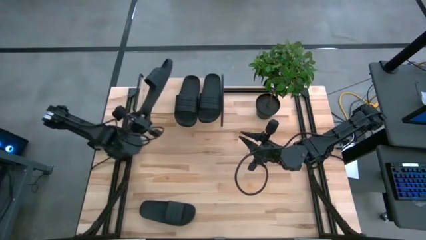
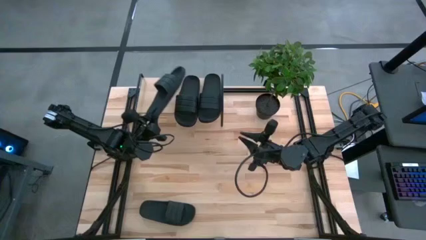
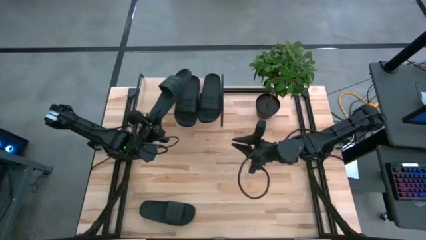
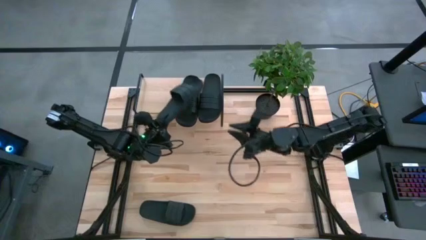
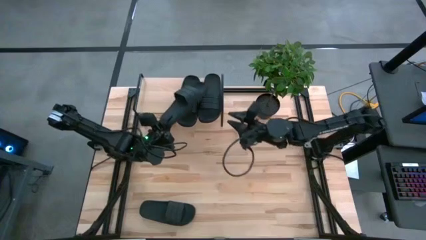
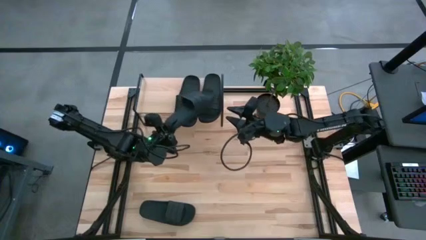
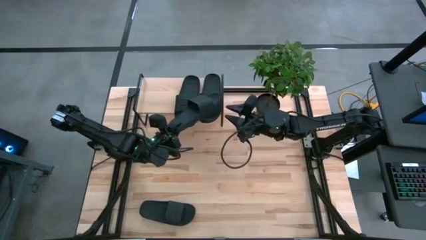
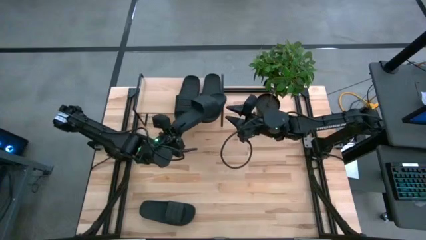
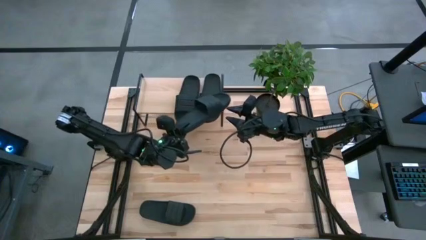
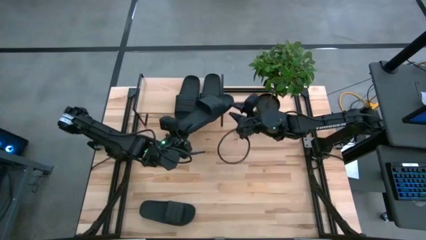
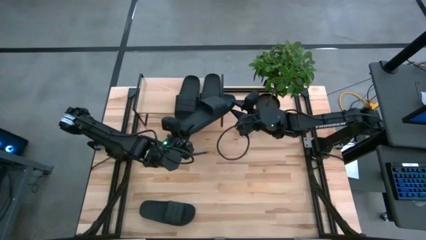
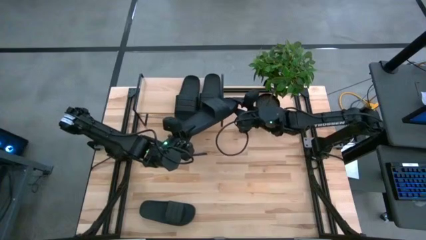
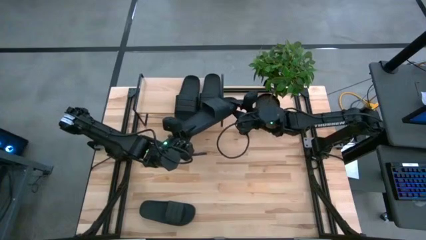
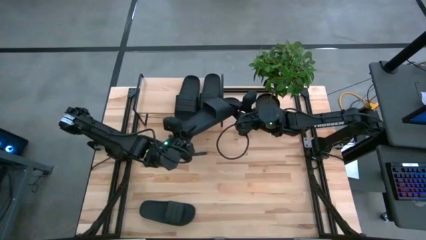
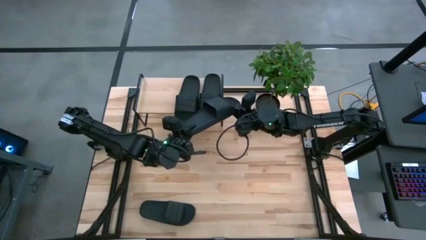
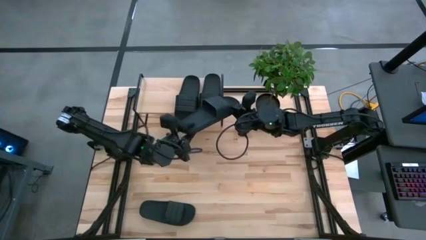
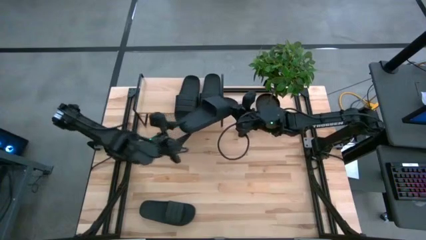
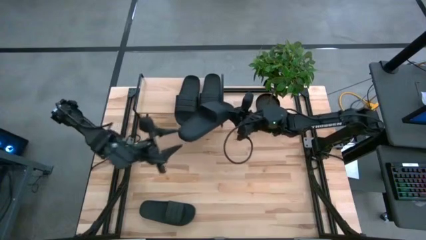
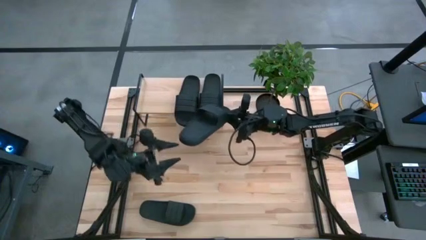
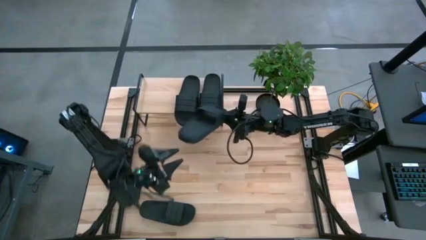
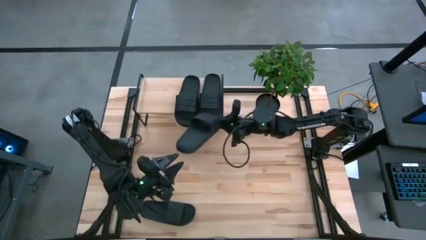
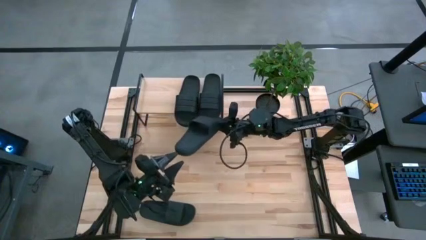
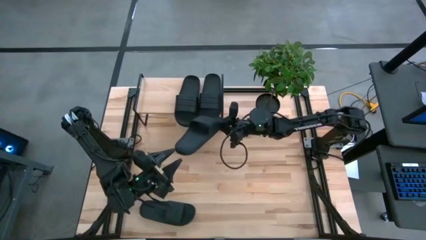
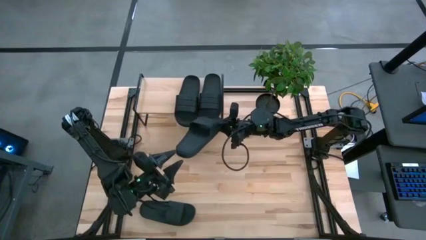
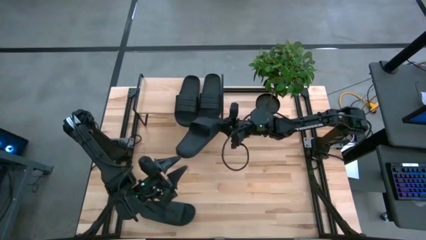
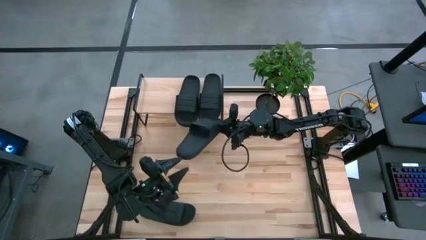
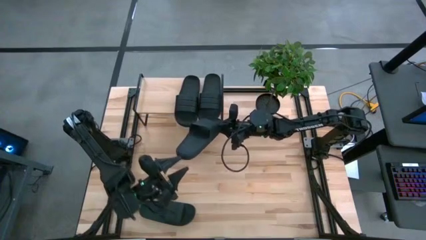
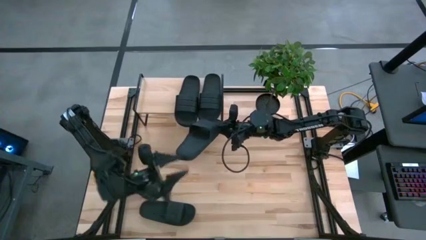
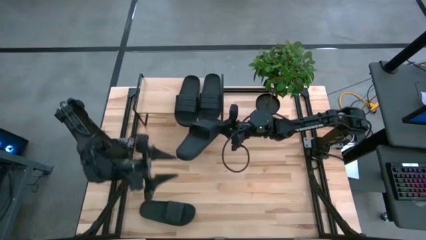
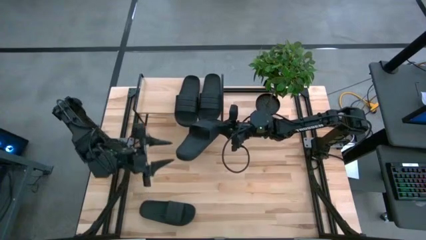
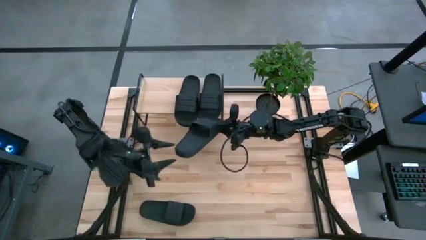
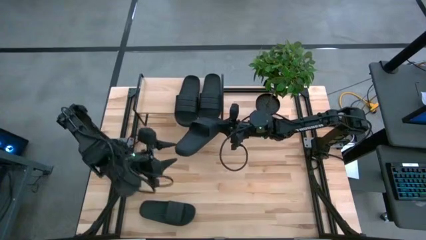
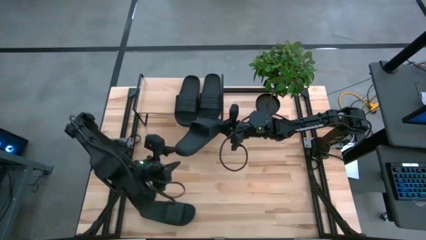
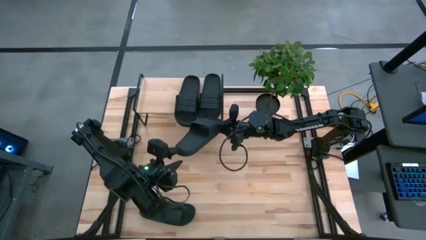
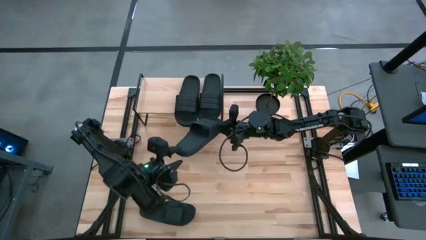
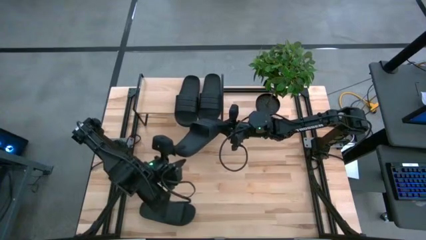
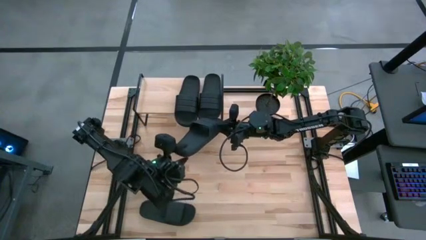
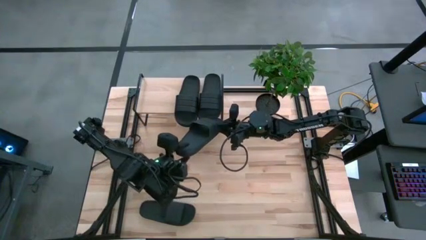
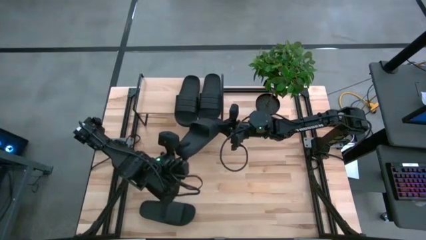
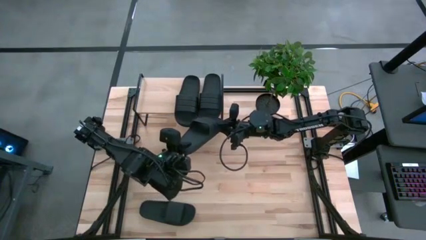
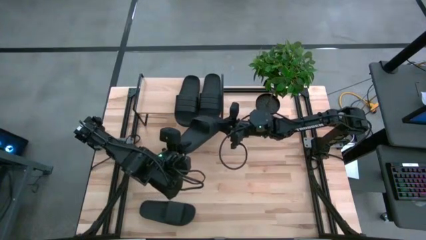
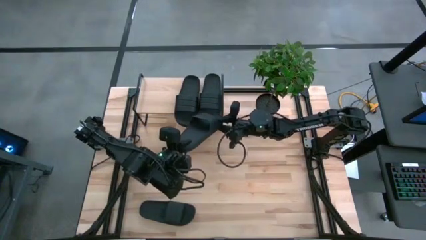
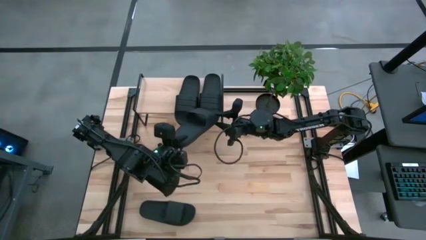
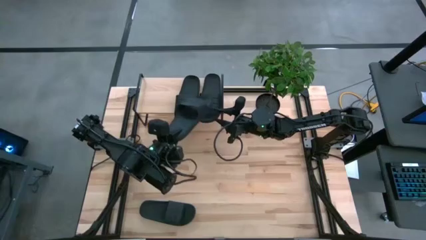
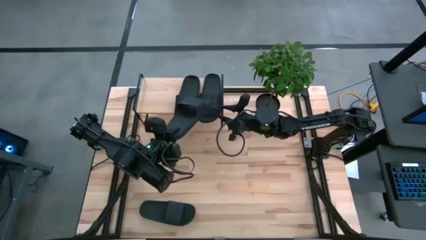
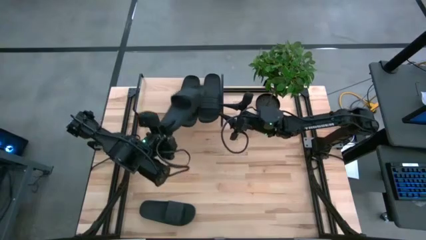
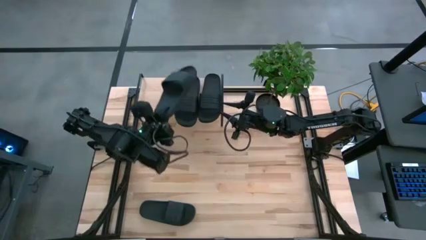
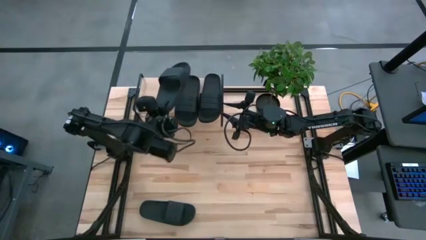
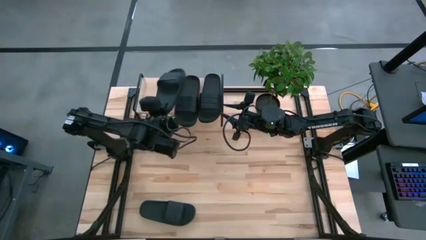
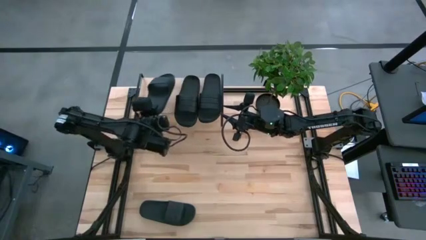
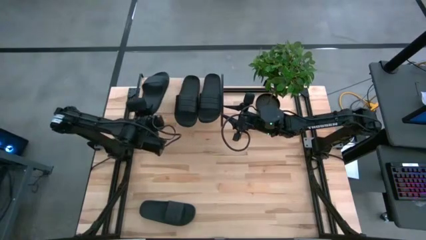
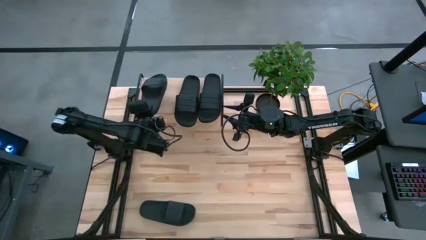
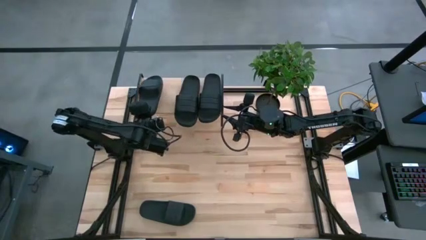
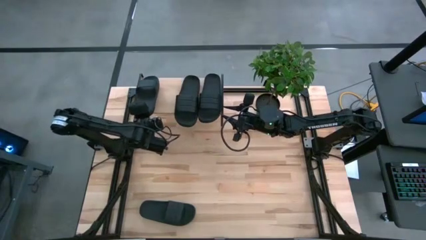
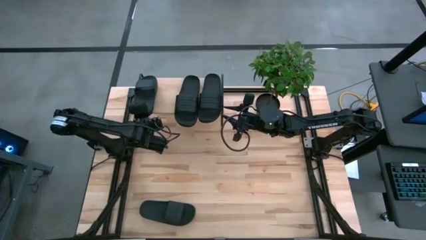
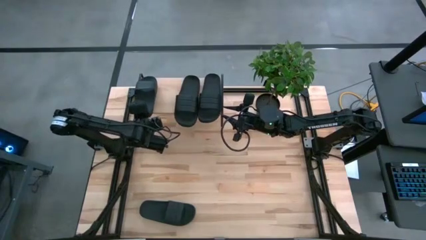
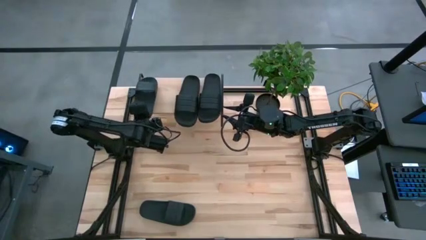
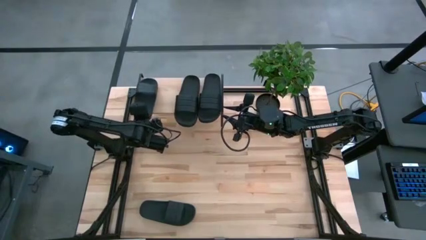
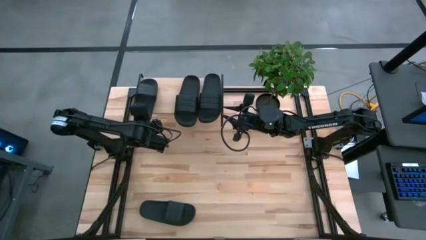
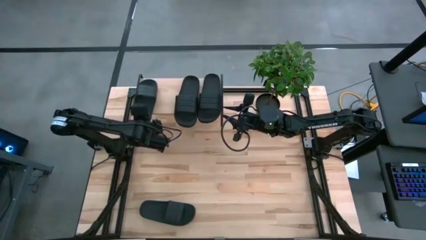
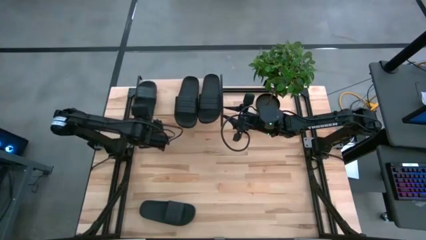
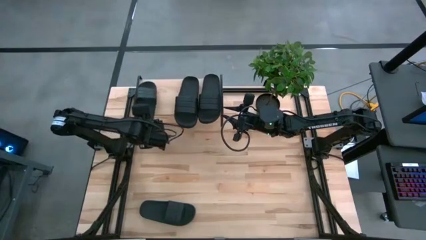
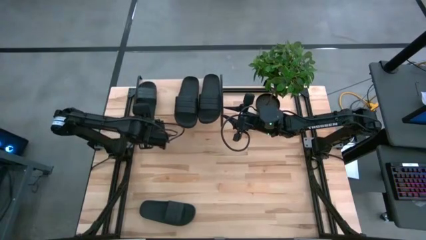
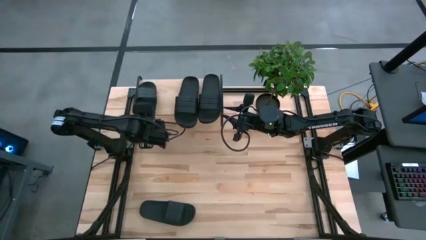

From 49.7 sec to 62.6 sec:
Task: Pick and place slides into the shelf
Put the top black slipper on the shelf
